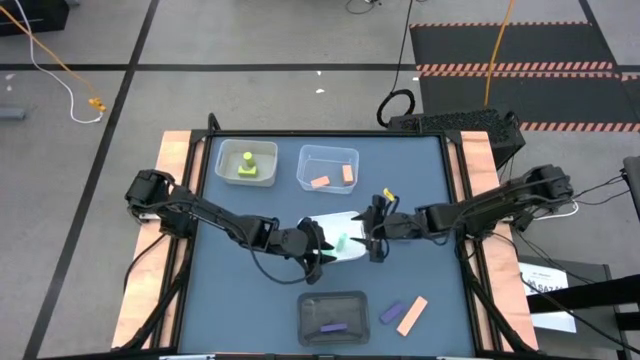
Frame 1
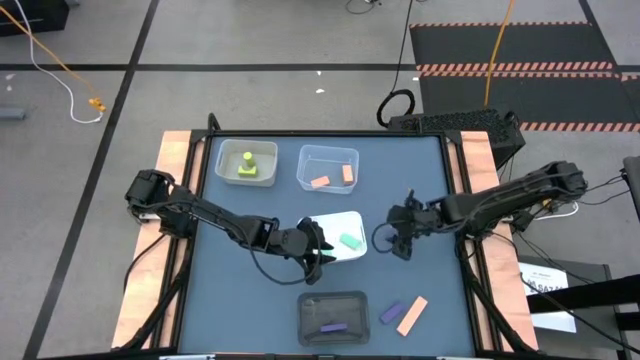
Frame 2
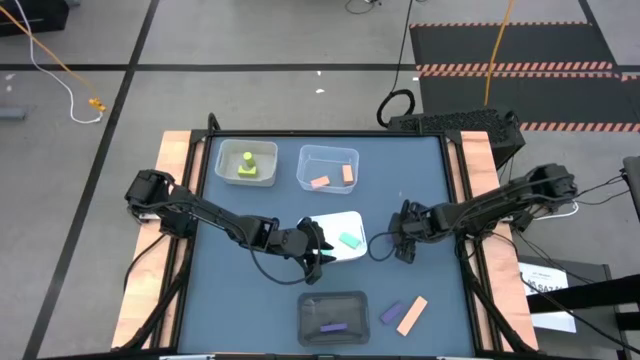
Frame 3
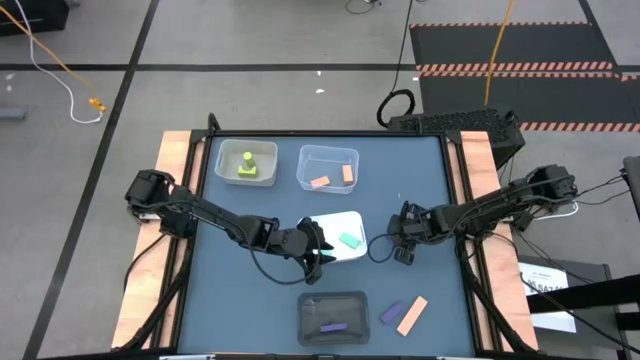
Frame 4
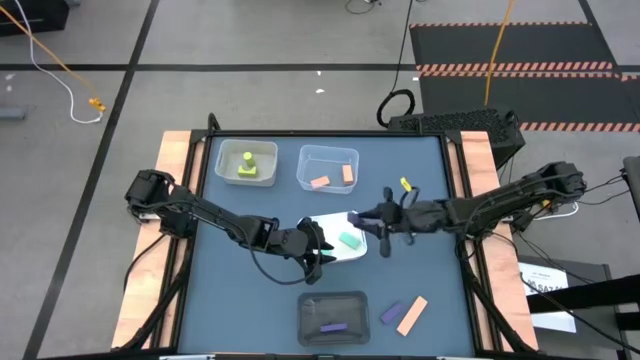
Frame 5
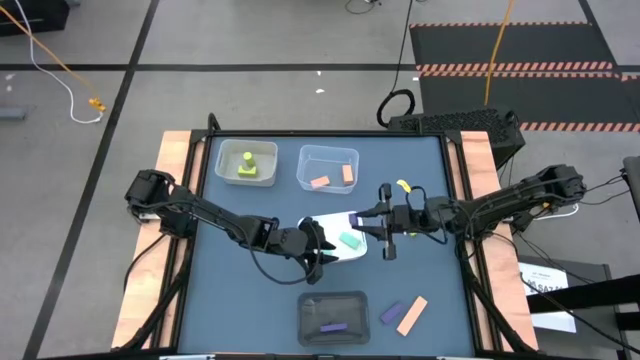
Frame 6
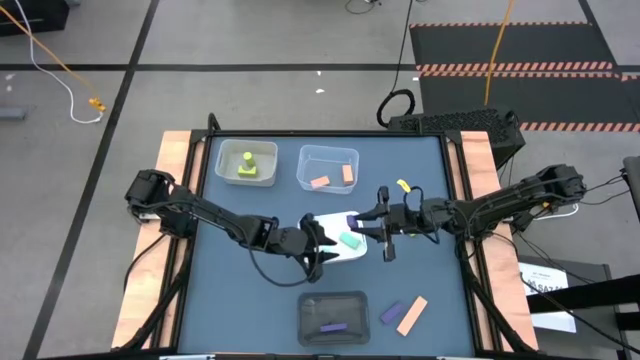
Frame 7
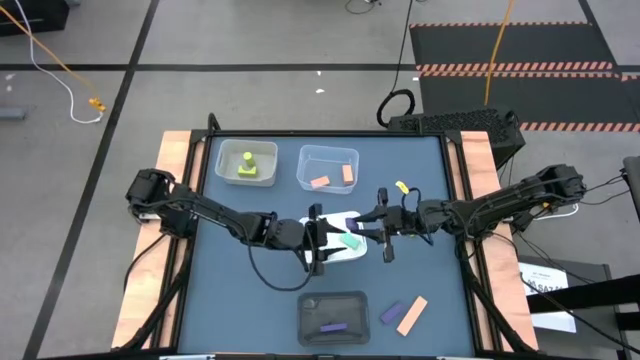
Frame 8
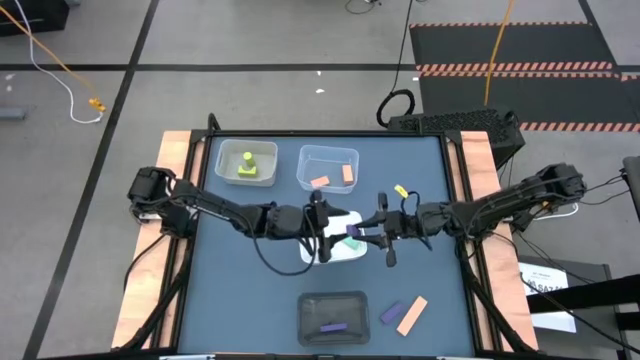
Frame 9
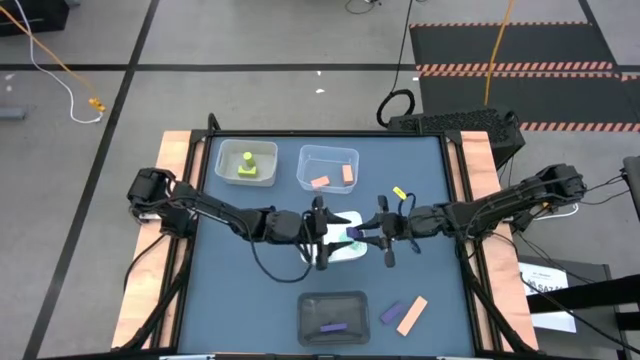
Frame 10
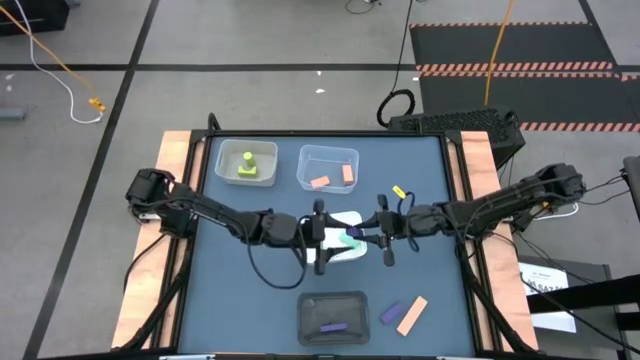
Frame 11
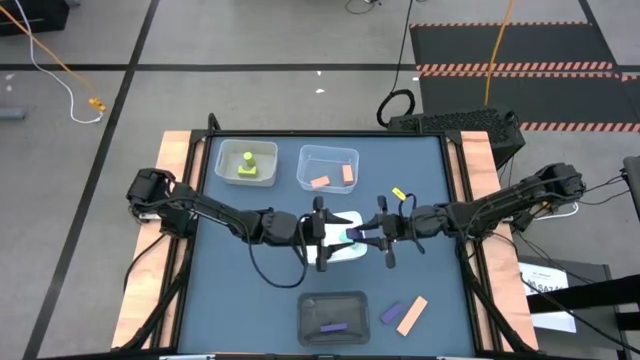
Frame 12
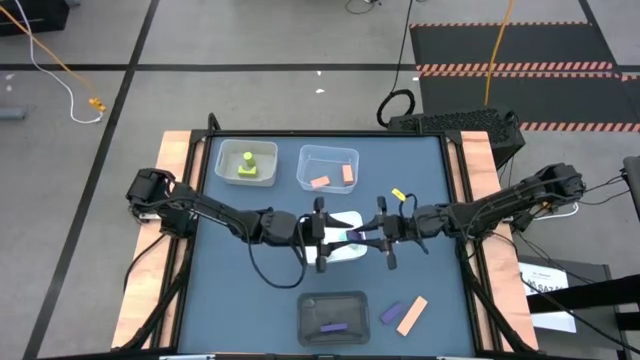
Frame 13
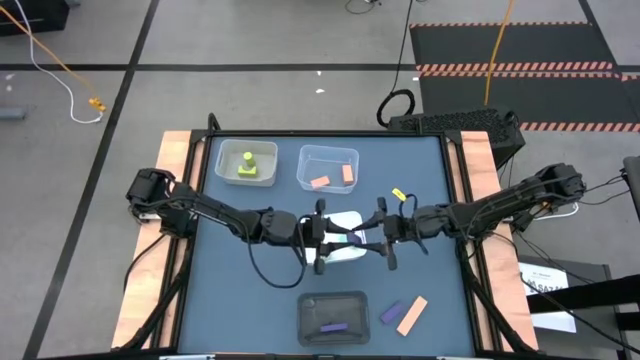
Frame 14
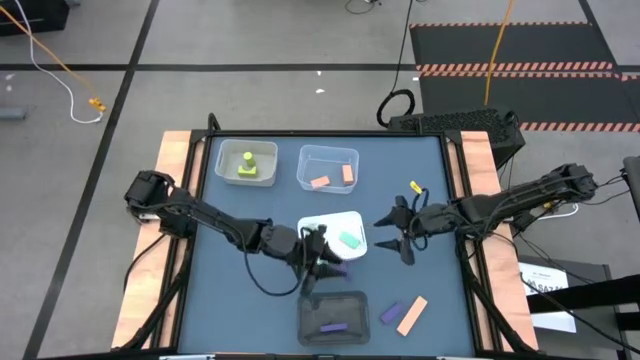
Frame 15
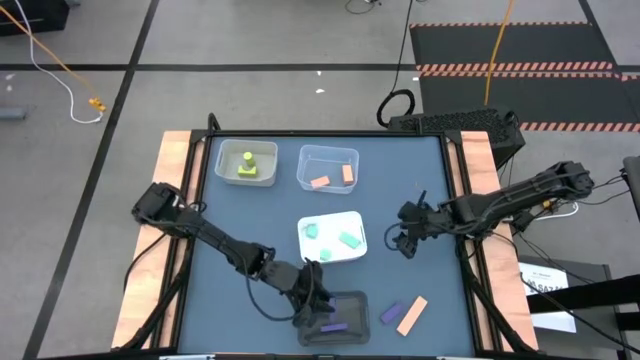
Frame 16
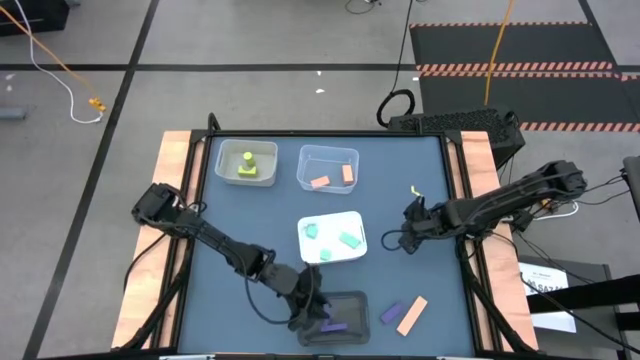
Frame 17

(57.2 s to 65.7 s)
Task: Sort & place blocks by color
Put the top violet block into the black bin

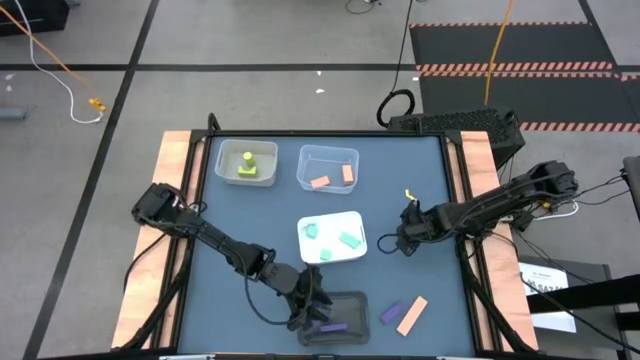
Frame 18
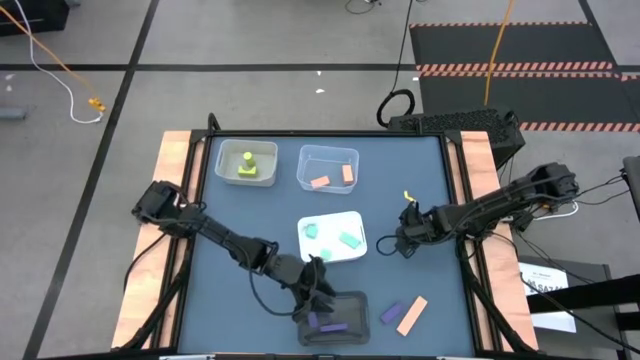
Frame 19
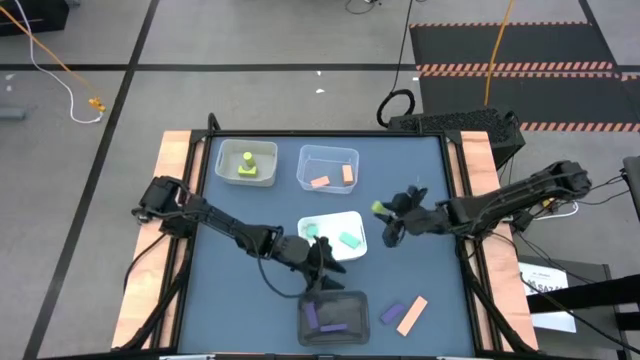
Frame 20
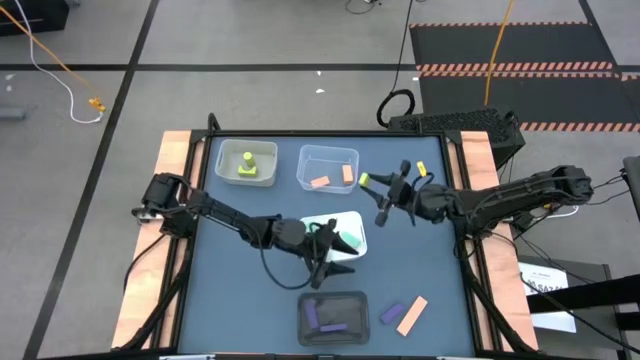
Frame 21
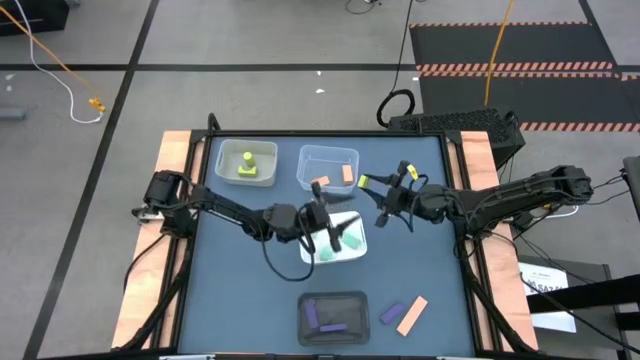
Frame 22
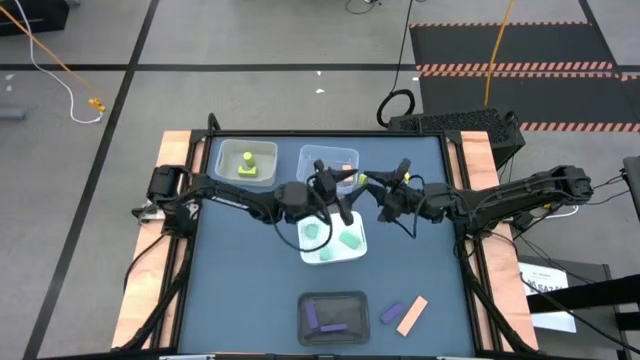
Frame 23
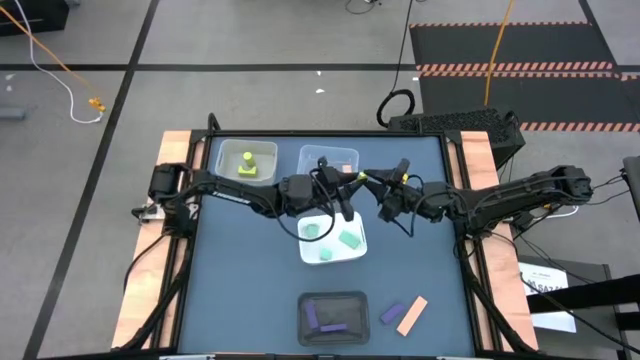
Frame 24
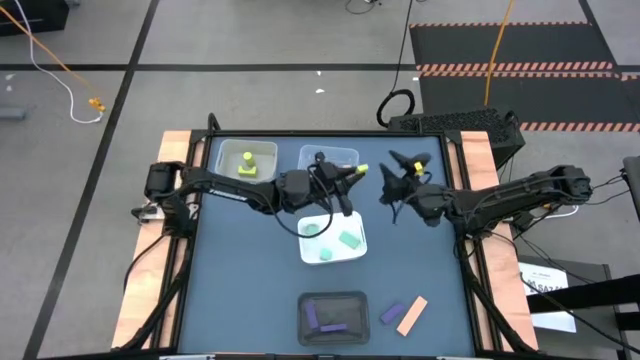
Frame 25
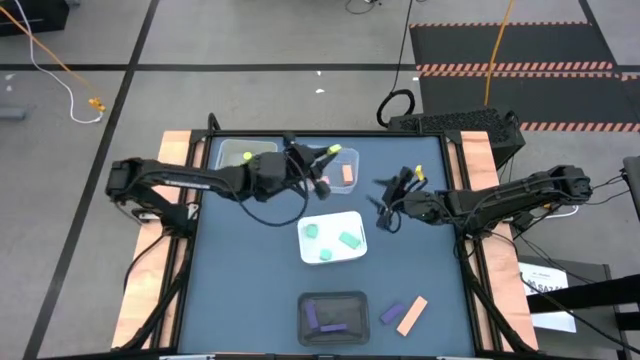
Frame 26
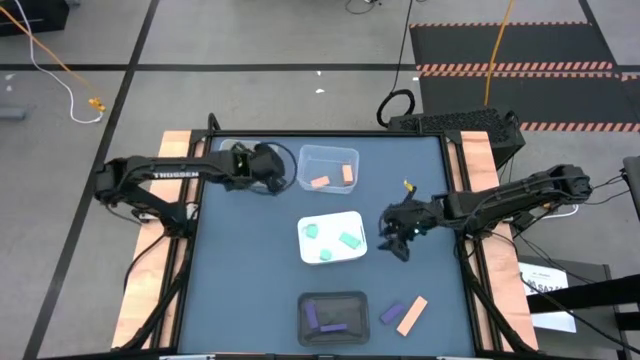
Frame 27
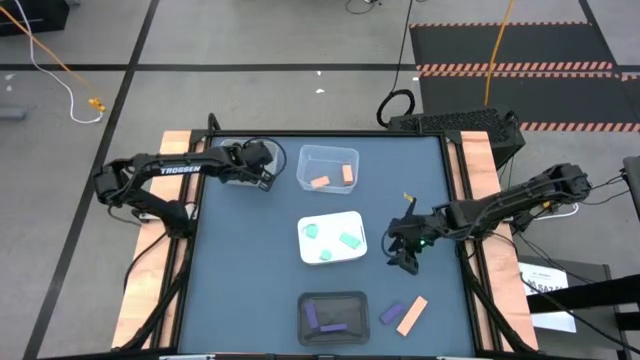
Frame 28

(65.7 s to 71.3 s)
Put the light green block into the gray bin

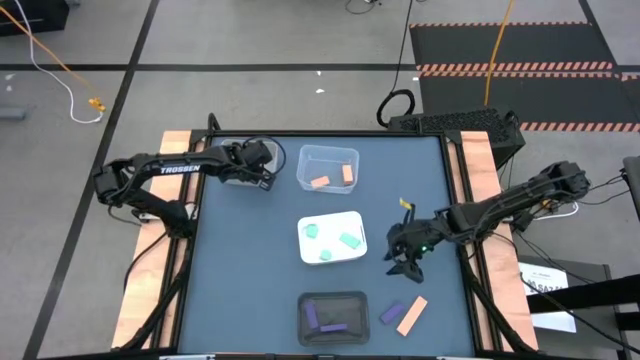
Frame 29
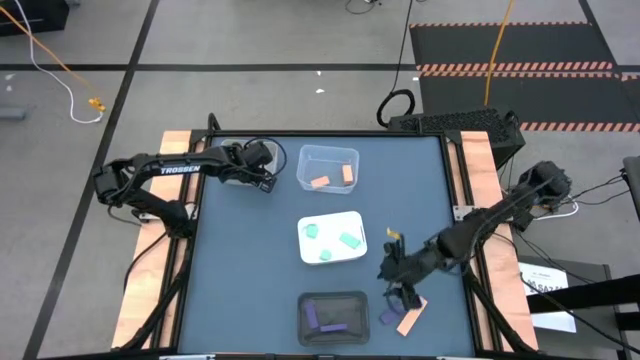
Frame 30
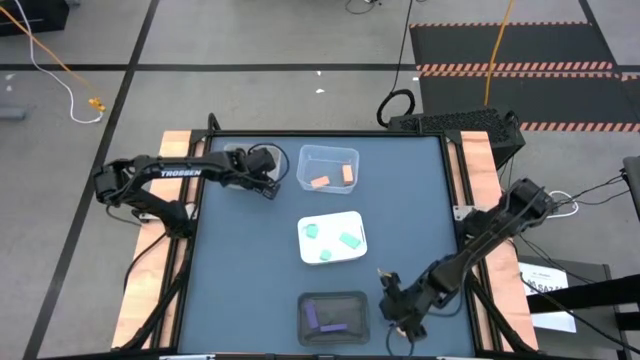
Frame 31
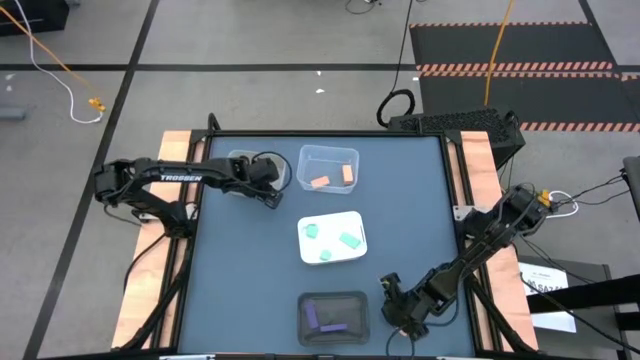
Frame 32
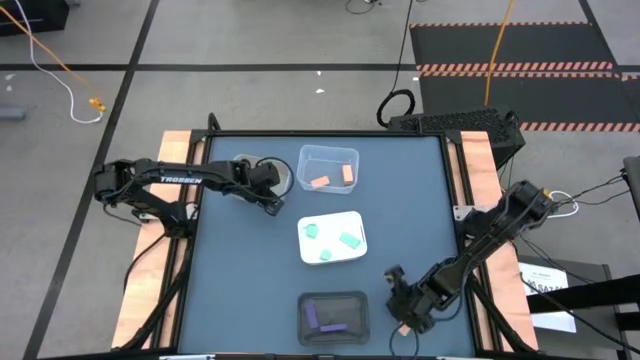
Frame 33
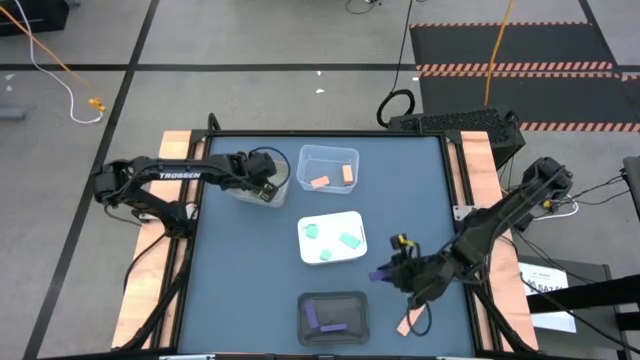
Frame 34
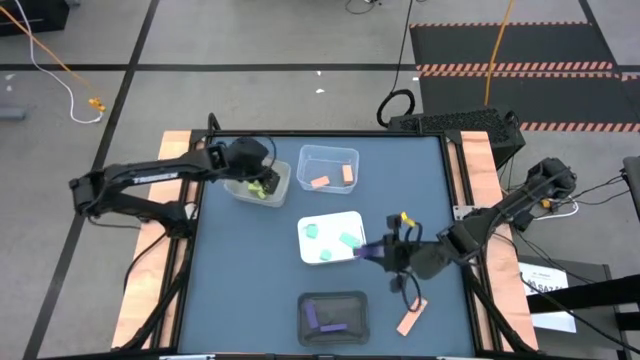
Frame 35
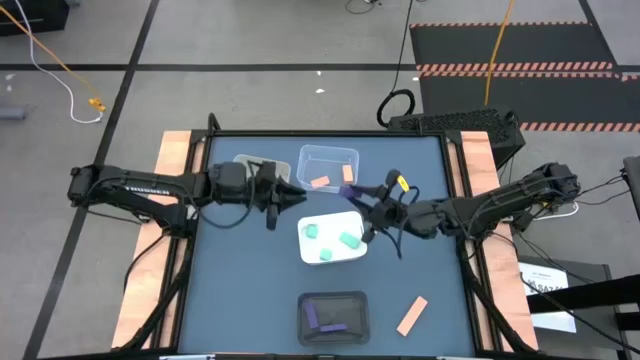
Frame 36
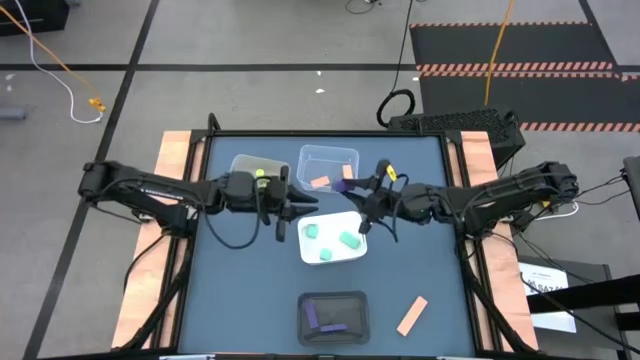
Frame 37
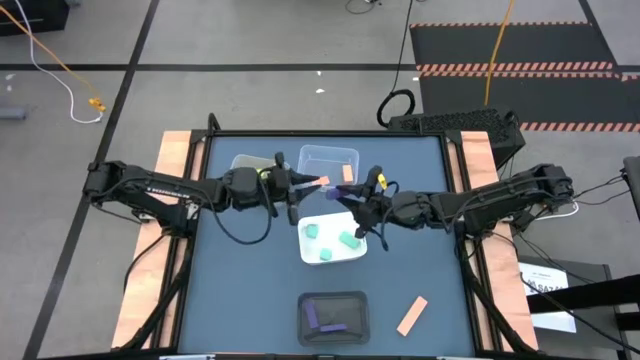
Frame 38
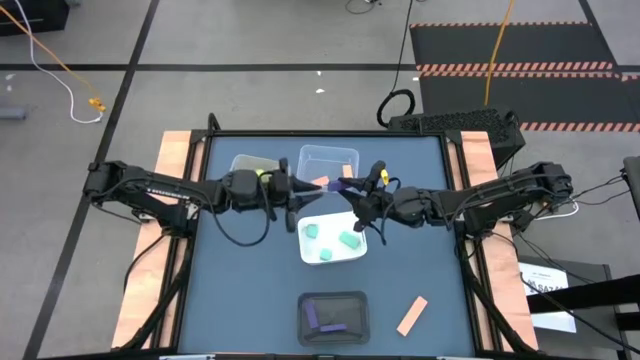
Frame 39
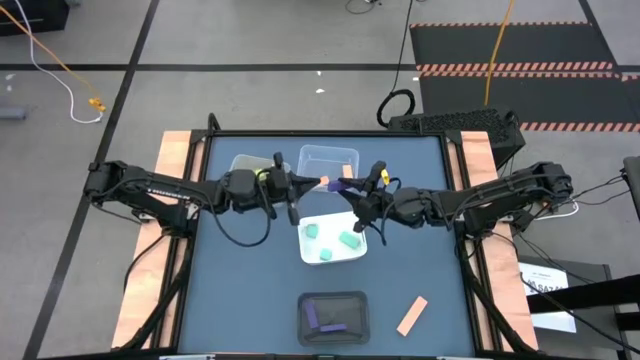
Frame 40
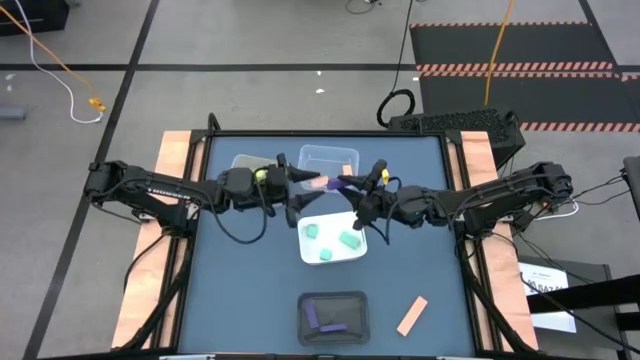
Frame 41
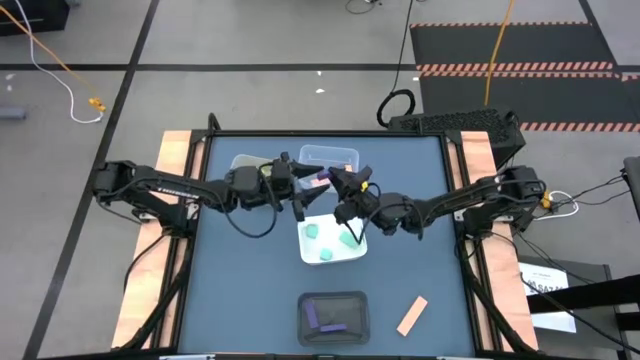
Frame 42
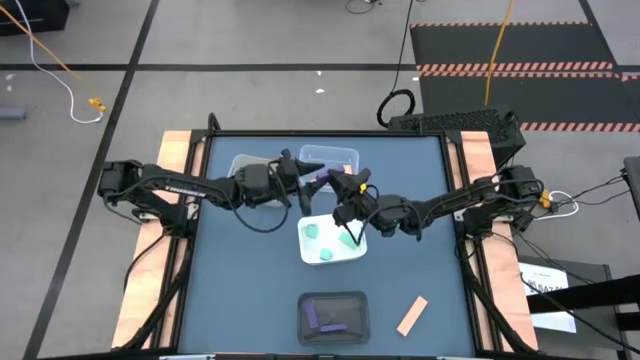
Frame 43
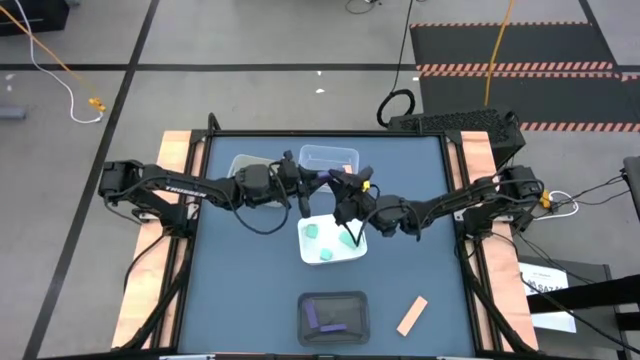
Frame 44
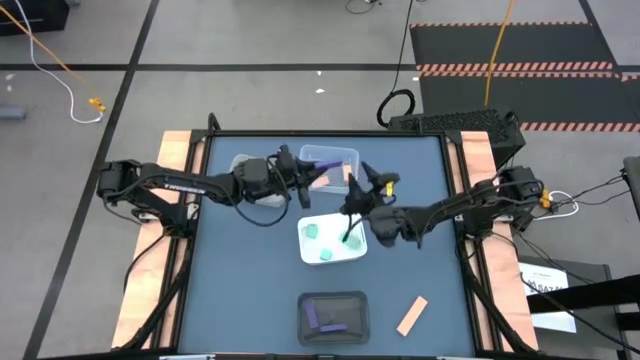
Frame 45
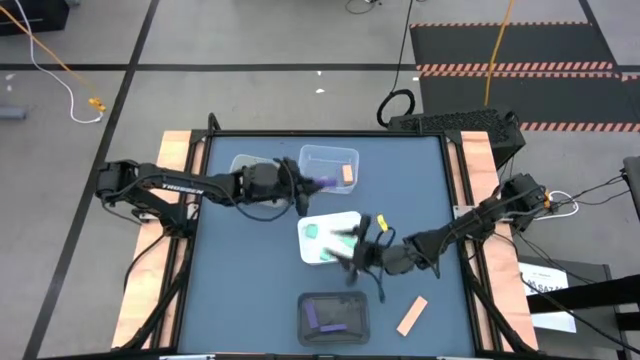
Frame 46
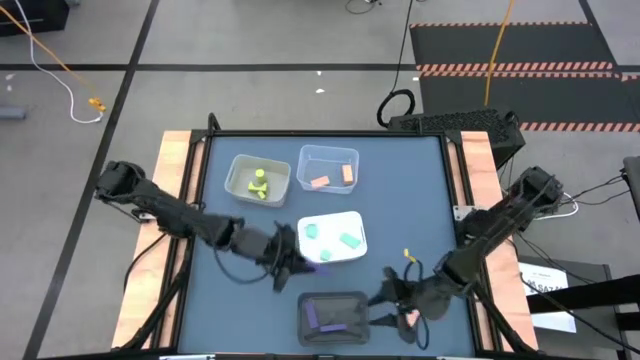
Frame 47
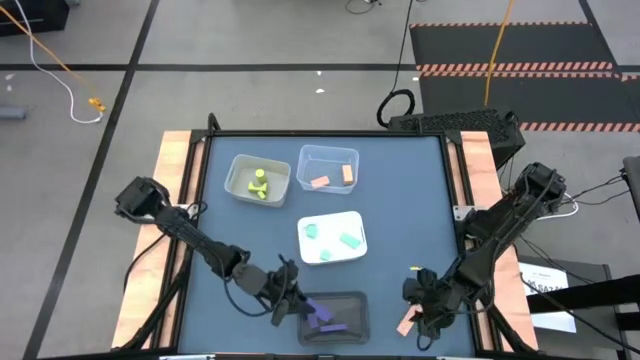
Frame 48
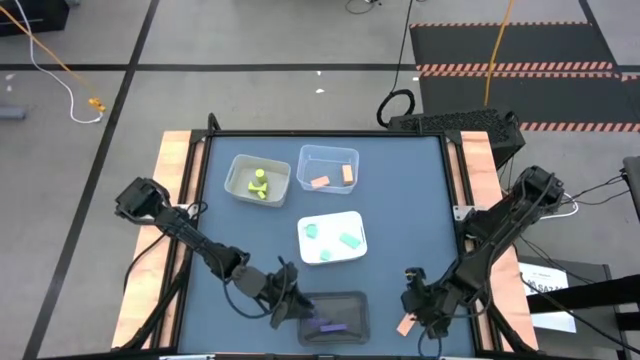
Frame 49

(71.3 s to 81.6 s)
Put the violet block into the black bin
